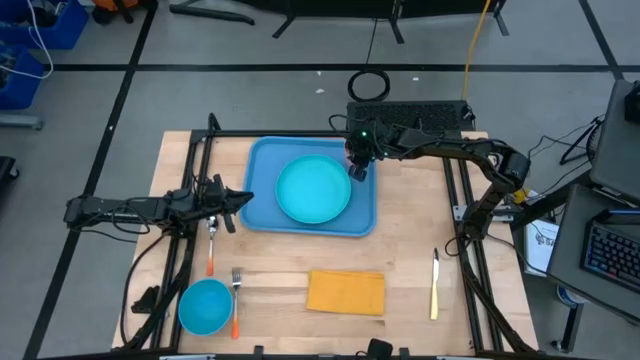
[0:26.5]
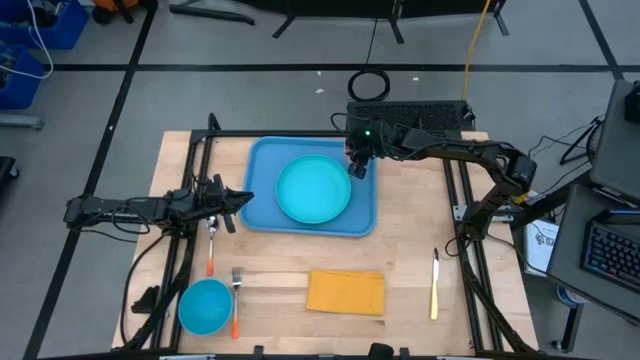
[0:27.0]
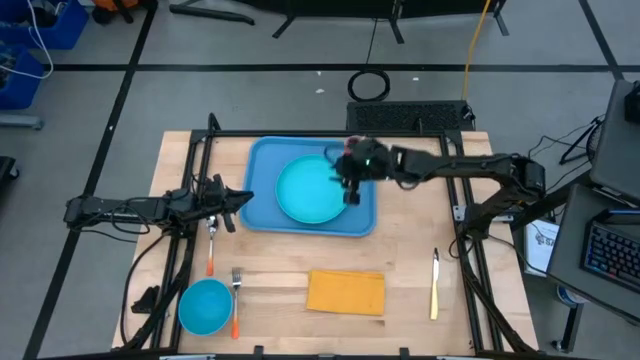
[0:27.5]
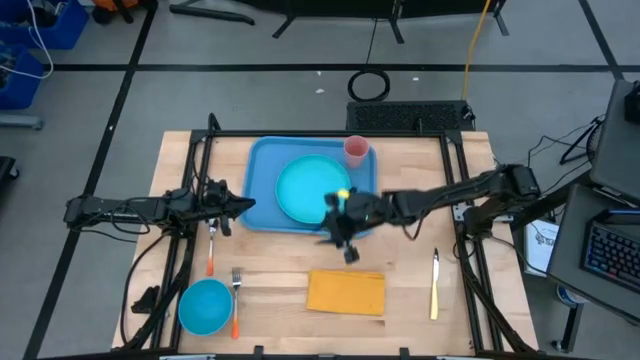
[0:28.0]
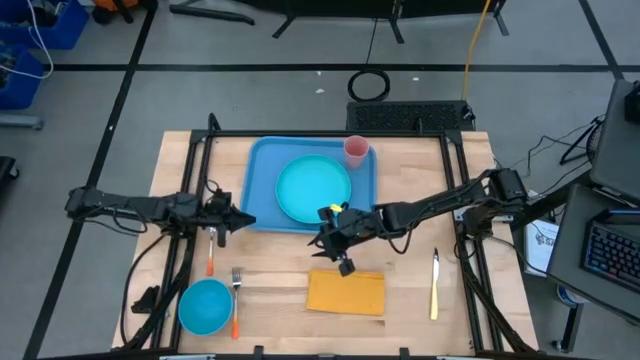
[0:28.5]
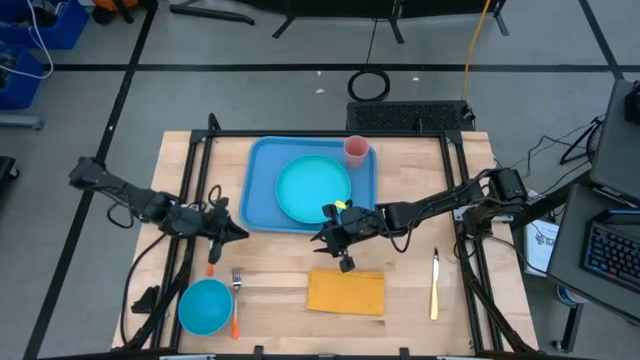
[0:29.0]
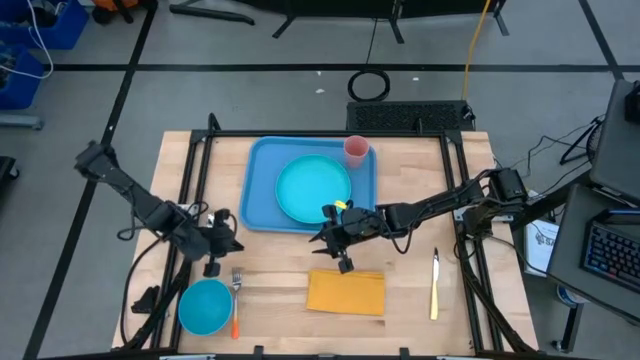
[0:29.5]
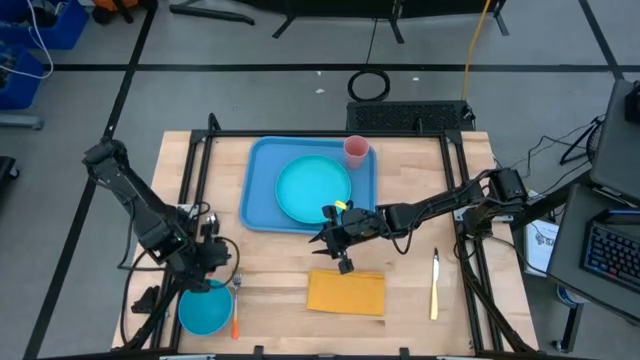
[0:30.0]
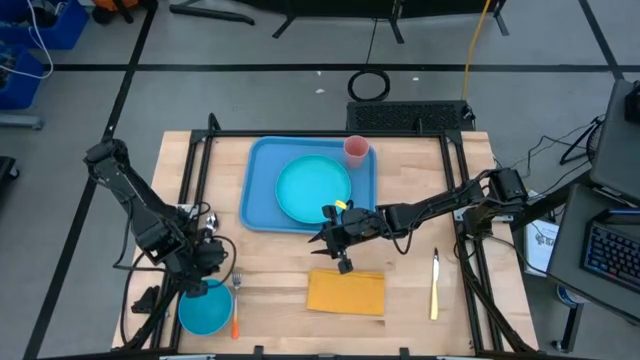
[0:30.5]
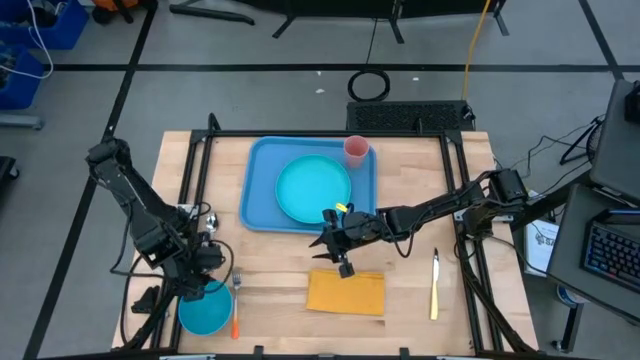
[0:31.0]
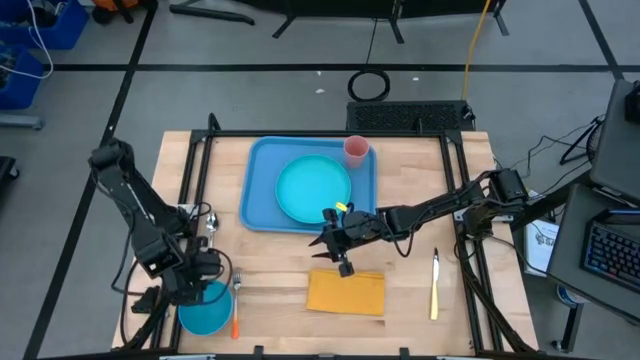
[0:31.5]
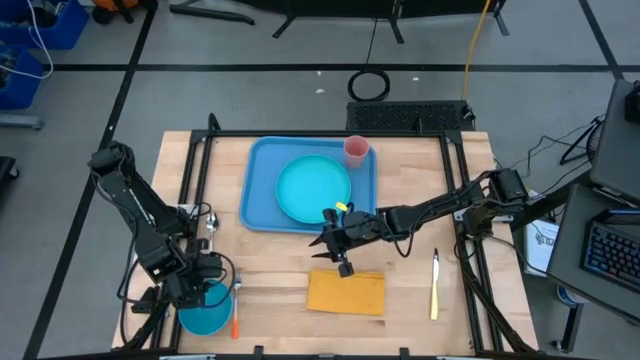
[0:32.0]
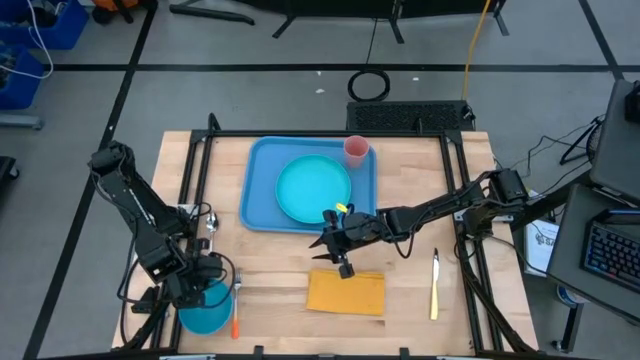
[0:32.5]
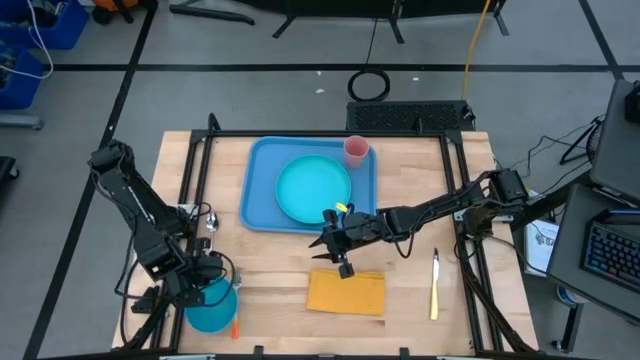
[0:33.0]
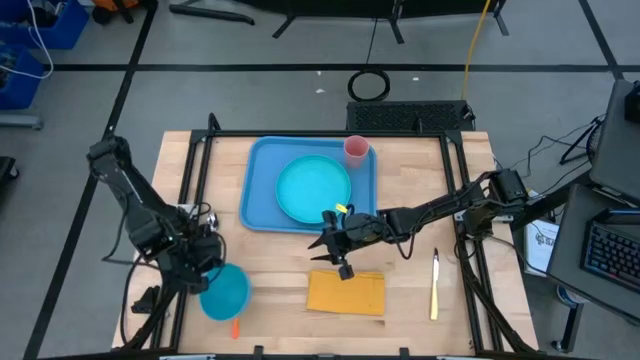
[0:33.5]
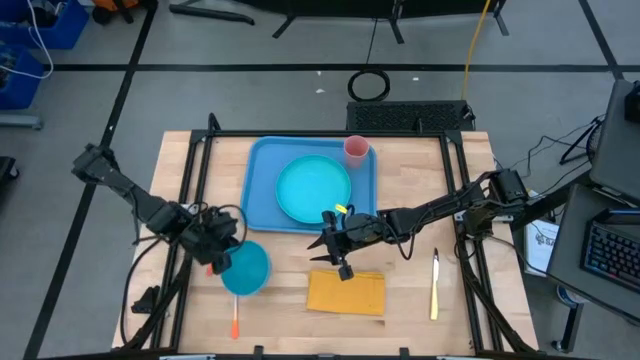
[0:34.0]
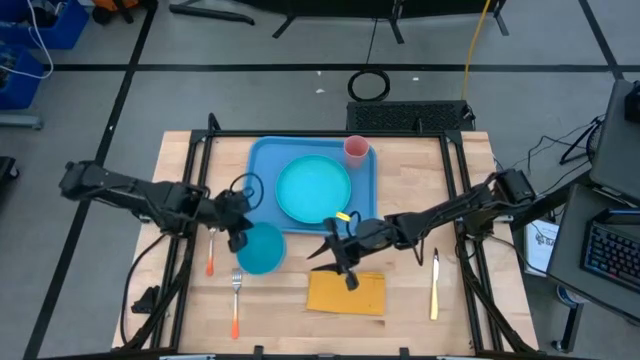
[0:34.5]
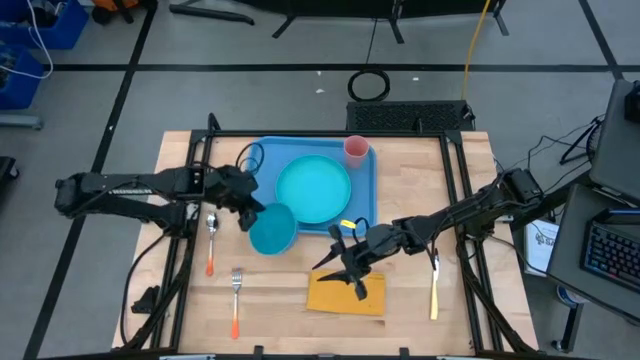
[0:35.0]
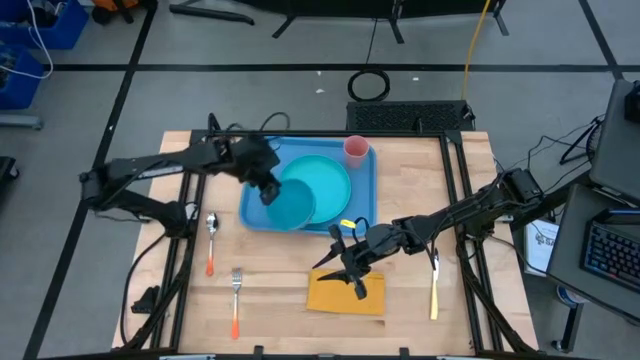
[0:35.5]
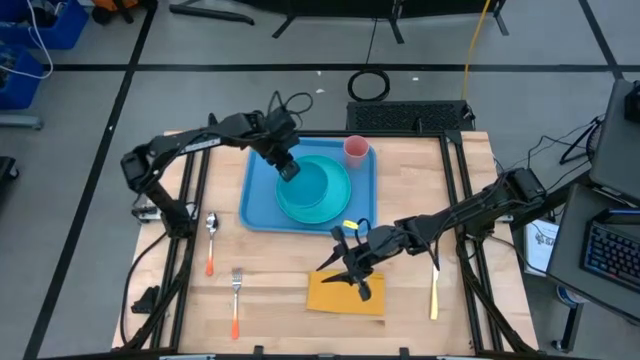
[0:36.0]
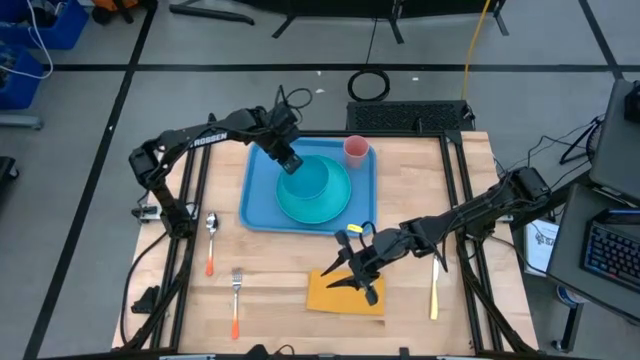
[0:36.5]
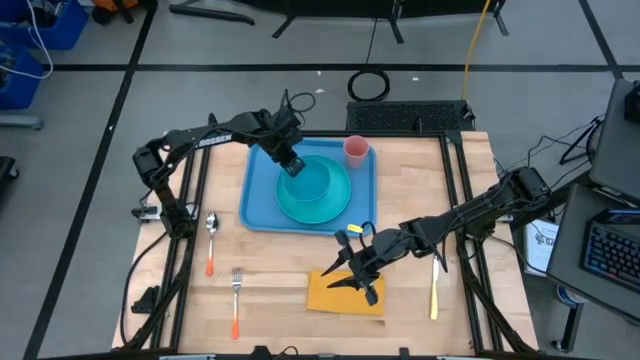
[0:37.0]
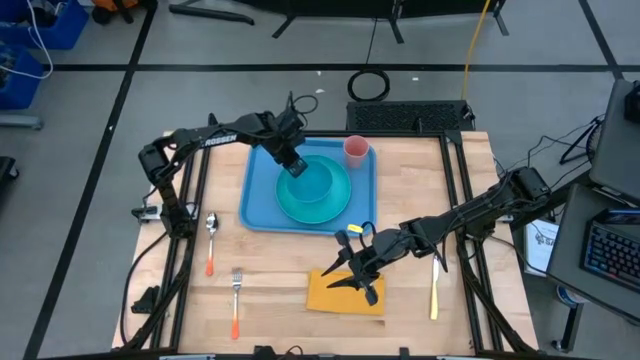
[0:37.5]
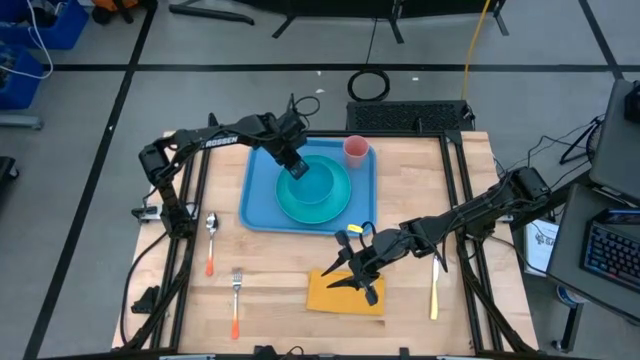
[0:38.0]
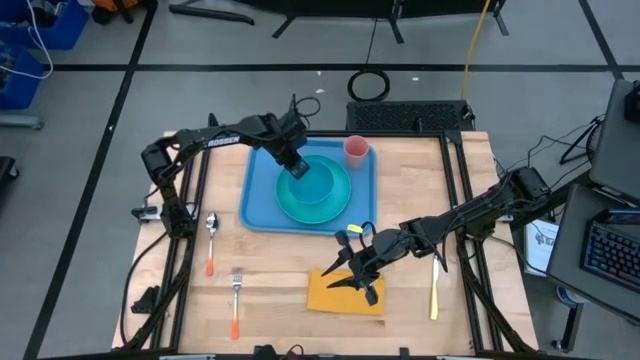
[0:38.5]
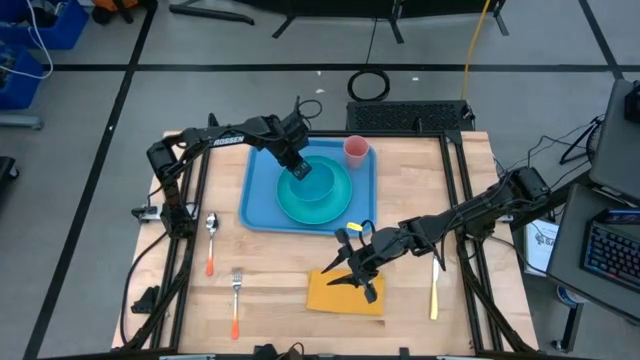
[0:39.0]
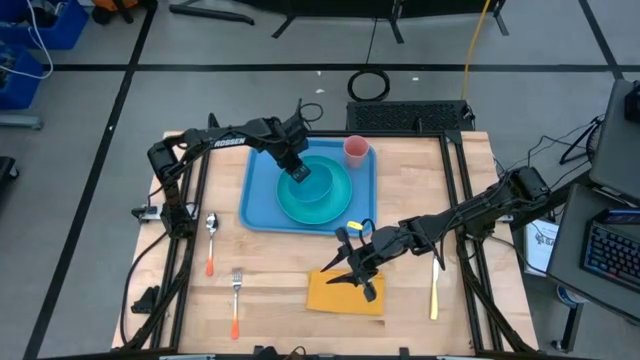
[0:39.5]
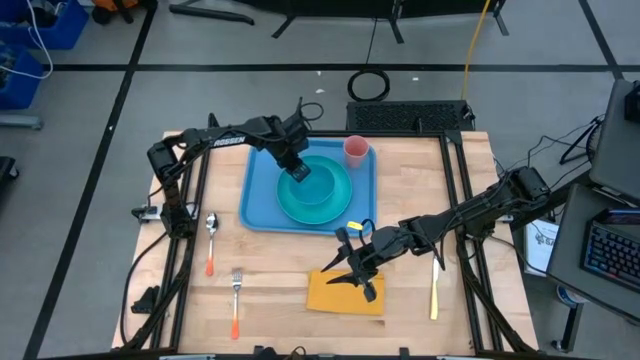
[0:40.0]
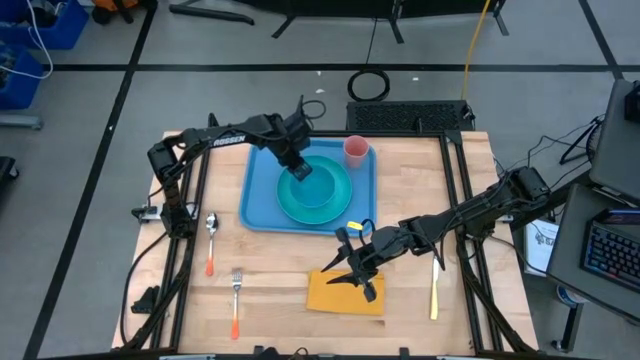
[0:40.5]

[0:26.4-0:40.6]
Task: Set up tray
Put the blue bowl on the green plate

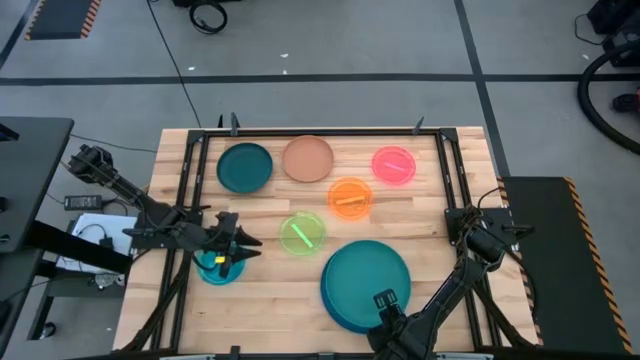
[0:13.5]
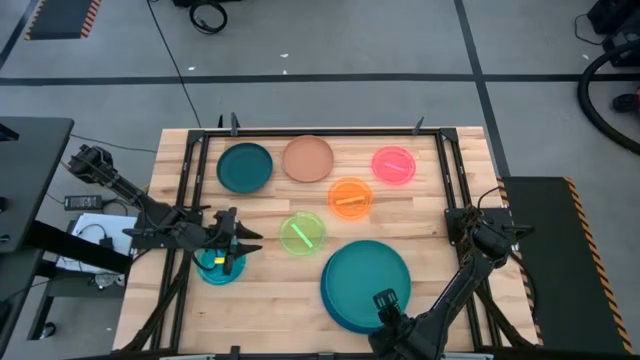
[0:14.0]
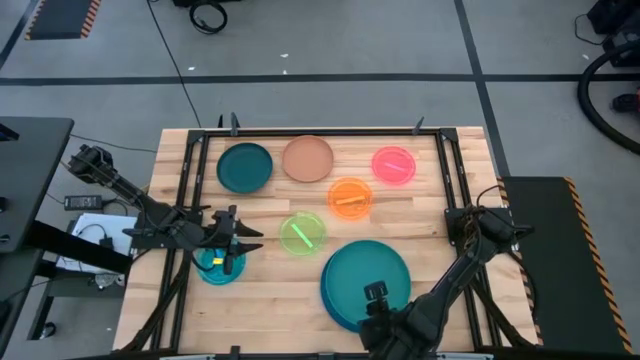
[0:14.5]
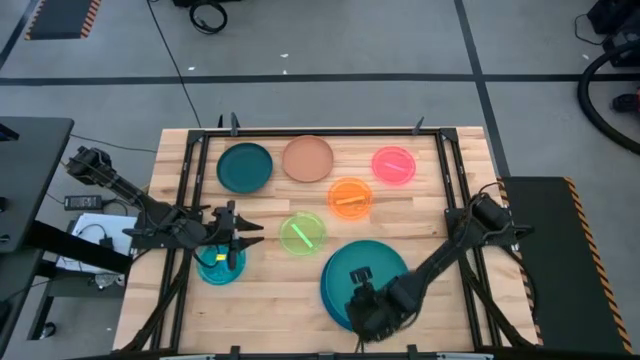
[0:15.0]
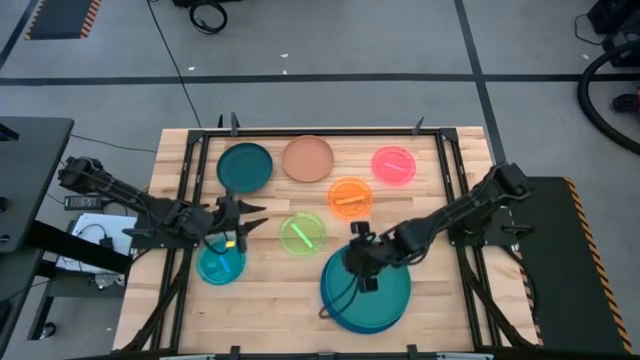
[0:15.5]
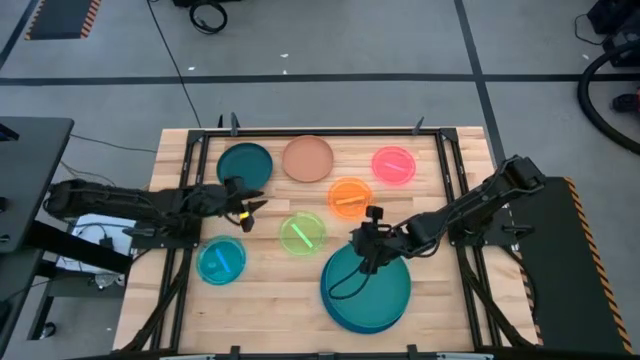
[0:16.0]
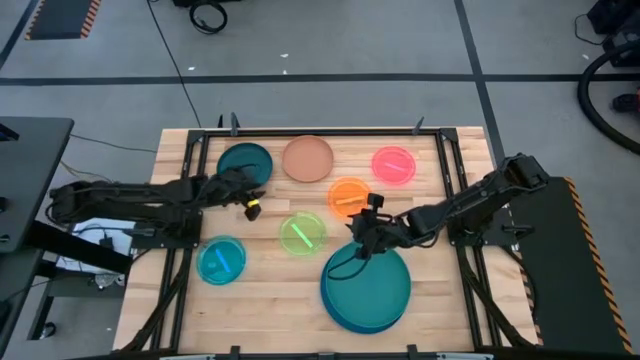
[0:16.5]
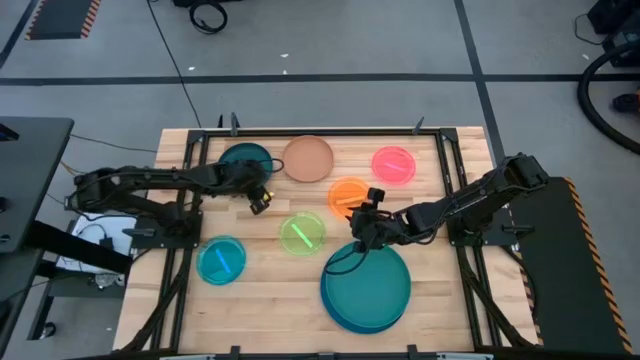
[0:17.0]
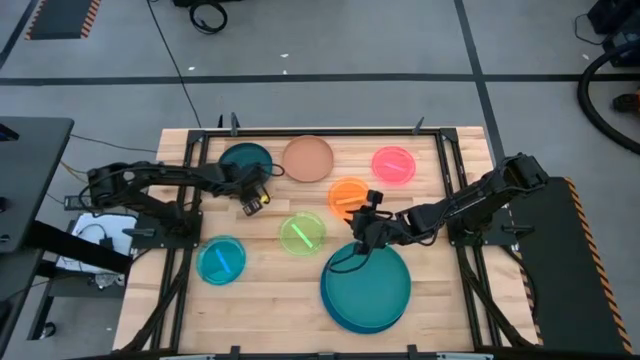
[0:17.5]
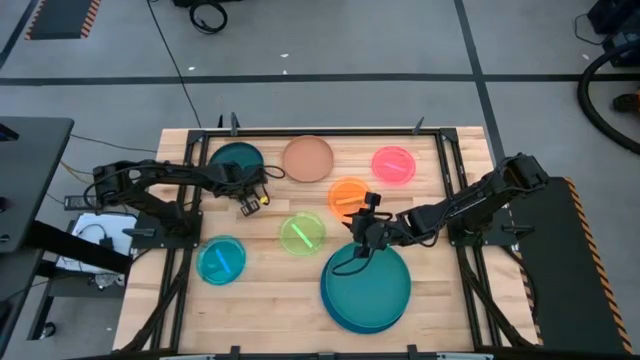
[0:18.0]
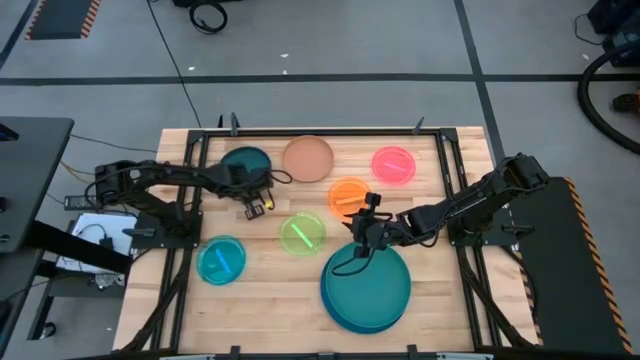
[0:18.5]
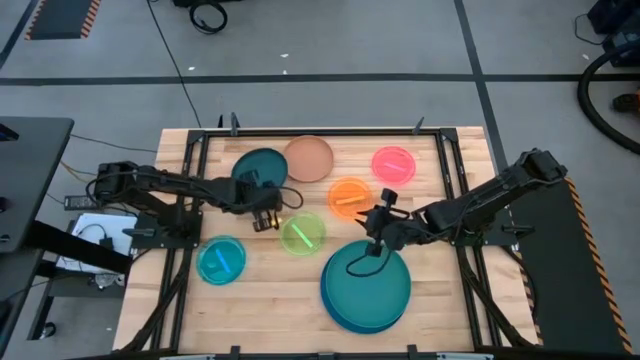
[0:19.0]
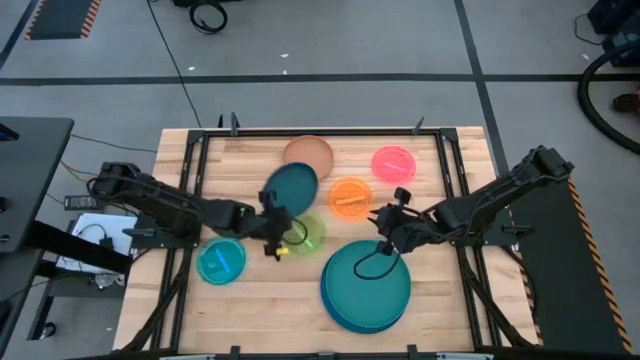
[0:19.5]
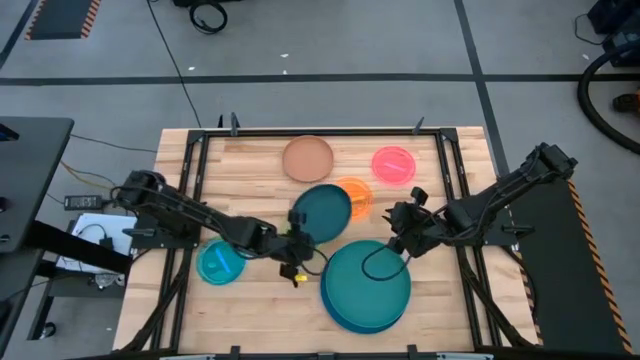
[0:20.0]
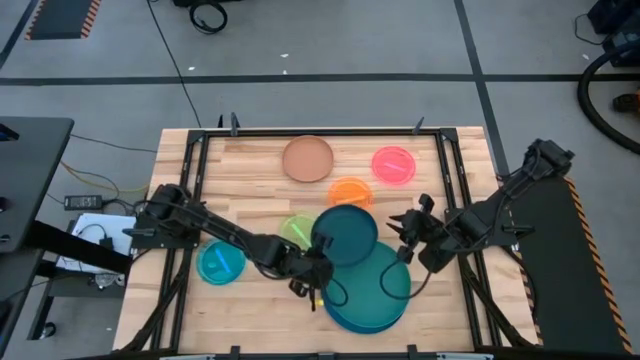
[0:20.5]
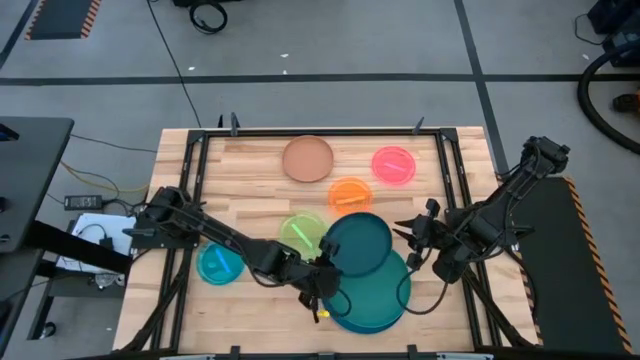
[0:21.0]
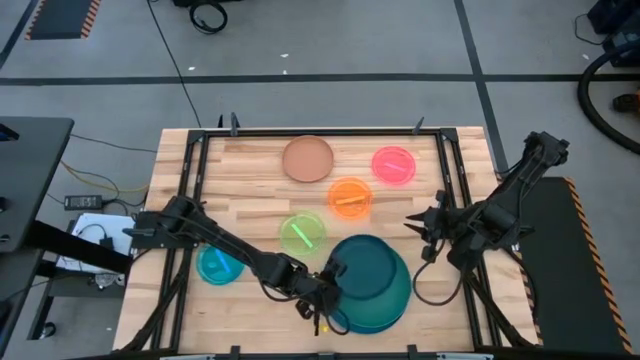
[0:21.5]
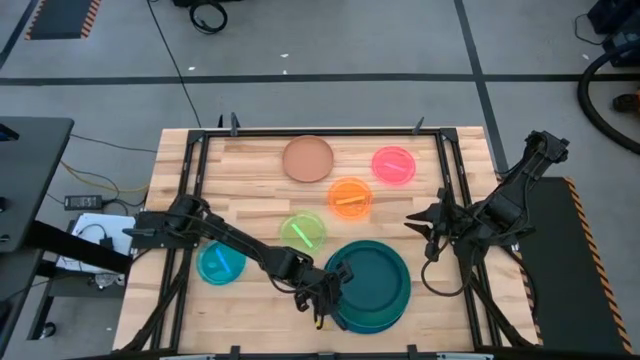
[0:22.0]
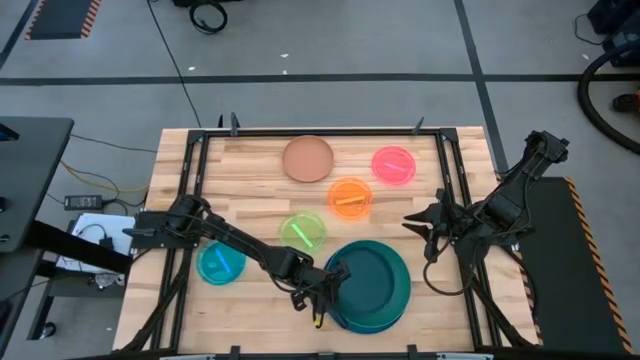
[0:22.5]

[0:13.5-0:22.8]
Task: Stack plastic plates
Stack the dark blue plate on the top of the green plate
